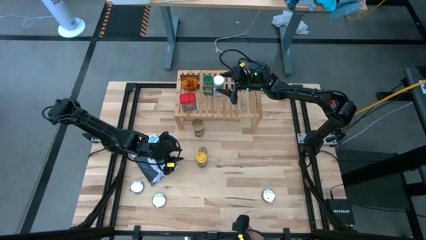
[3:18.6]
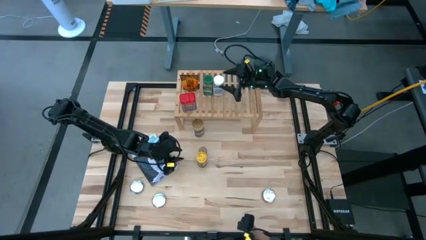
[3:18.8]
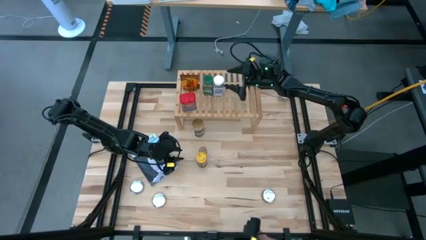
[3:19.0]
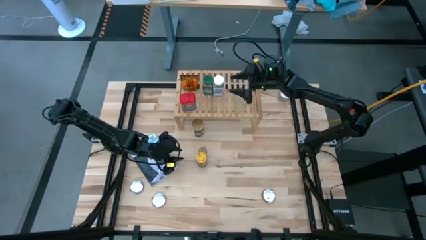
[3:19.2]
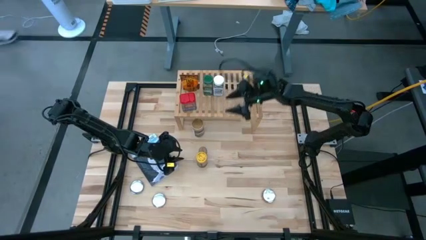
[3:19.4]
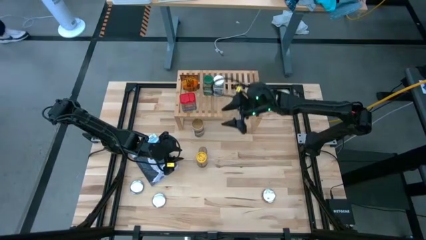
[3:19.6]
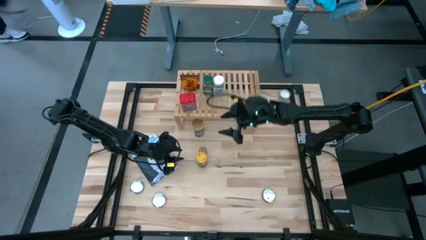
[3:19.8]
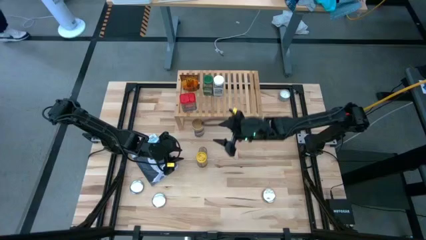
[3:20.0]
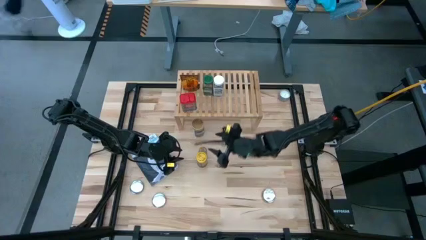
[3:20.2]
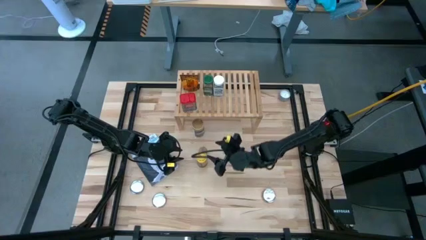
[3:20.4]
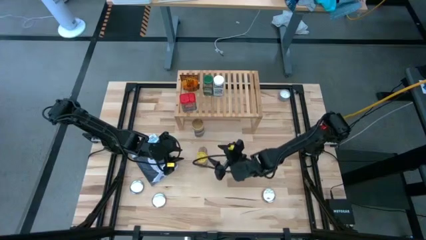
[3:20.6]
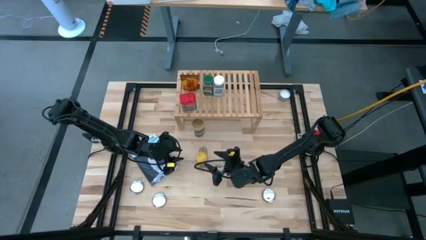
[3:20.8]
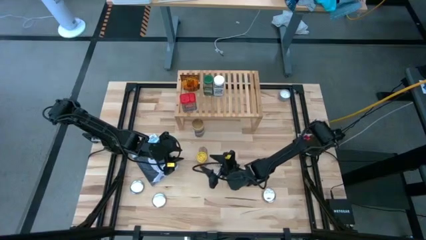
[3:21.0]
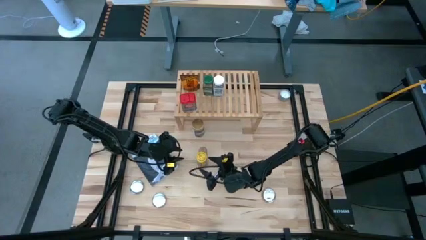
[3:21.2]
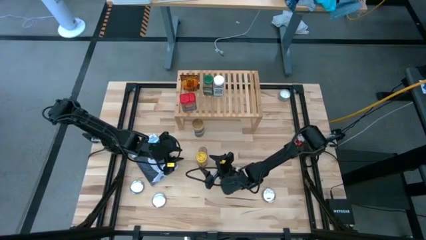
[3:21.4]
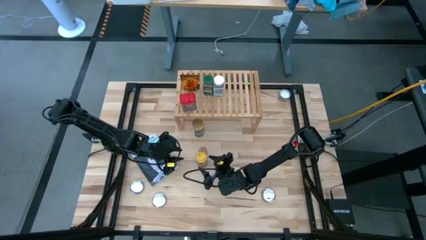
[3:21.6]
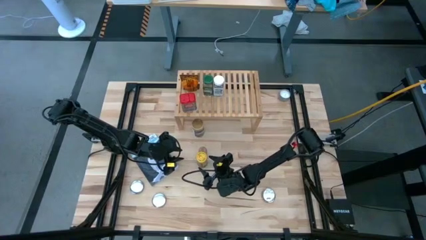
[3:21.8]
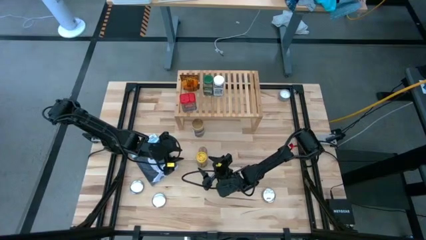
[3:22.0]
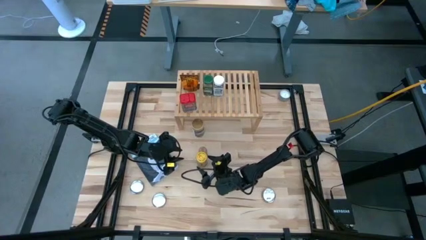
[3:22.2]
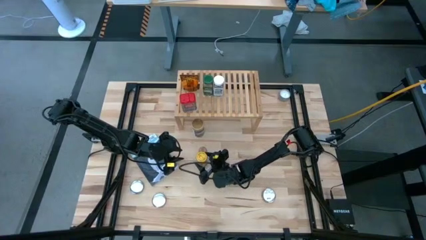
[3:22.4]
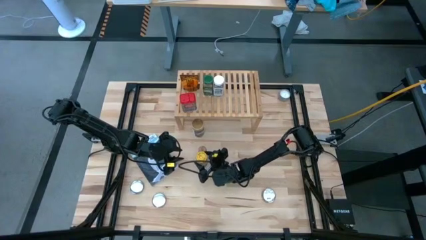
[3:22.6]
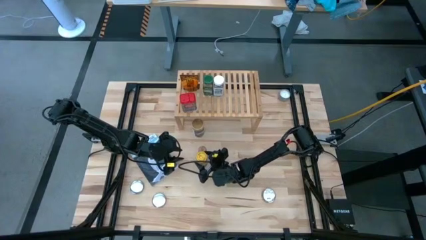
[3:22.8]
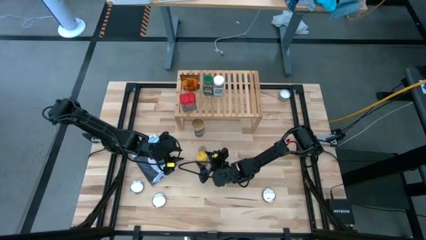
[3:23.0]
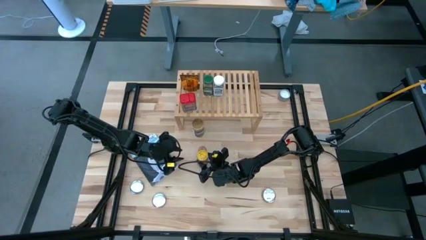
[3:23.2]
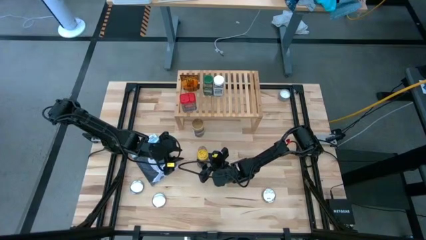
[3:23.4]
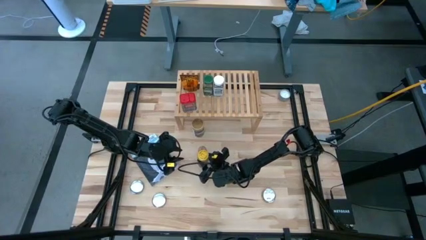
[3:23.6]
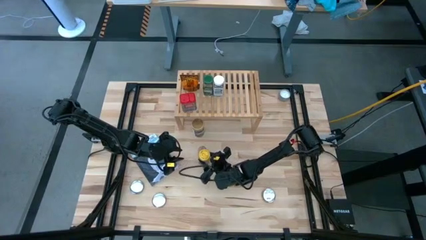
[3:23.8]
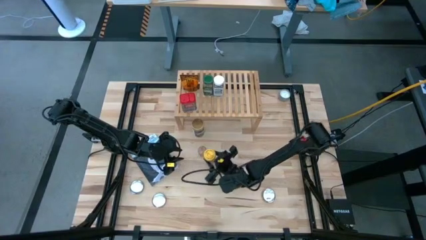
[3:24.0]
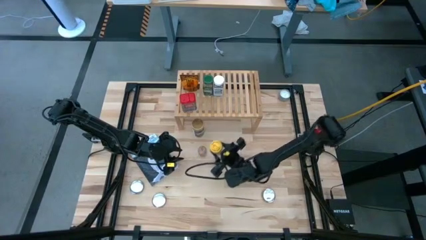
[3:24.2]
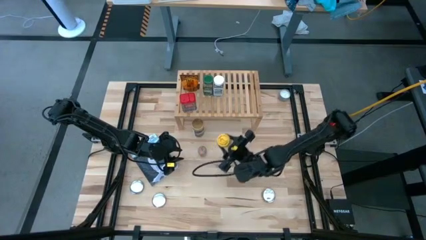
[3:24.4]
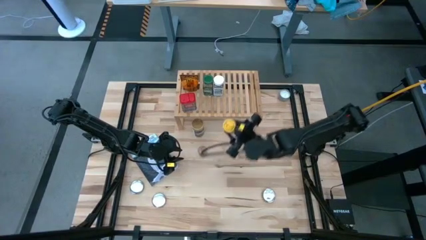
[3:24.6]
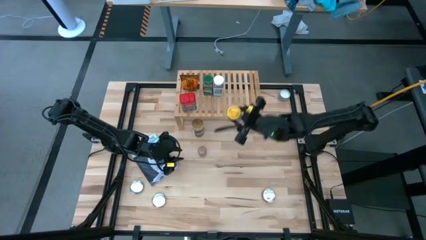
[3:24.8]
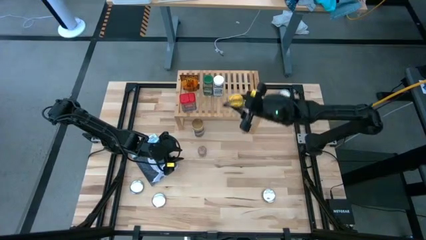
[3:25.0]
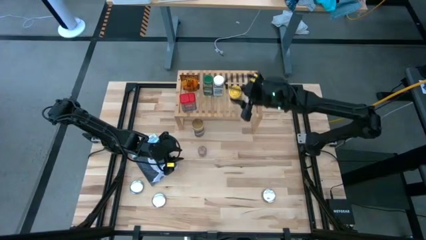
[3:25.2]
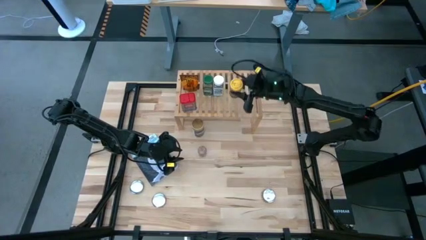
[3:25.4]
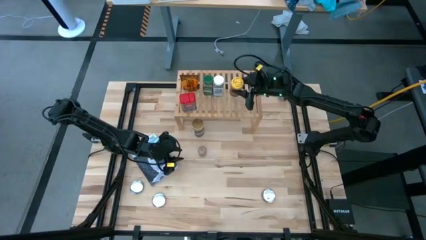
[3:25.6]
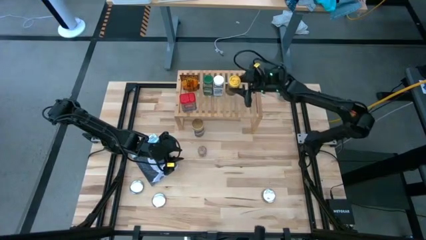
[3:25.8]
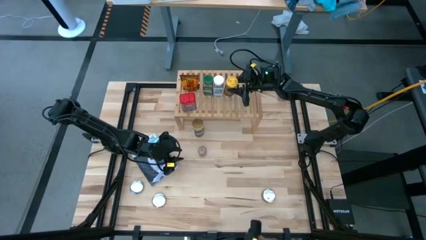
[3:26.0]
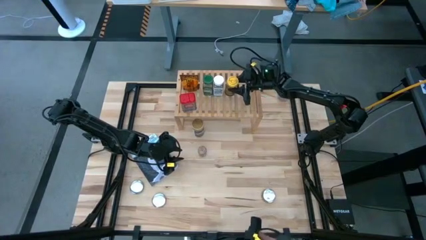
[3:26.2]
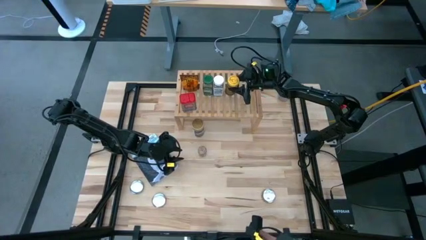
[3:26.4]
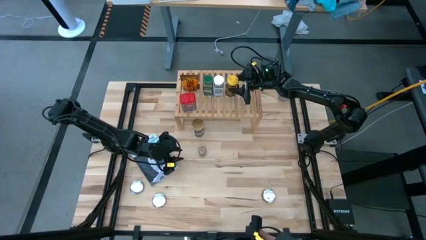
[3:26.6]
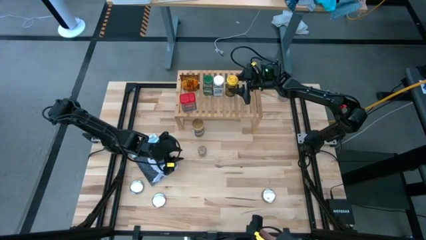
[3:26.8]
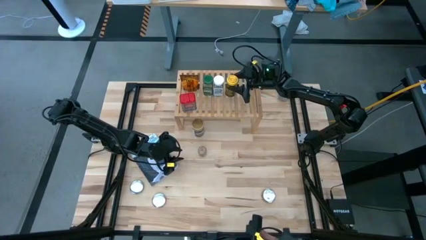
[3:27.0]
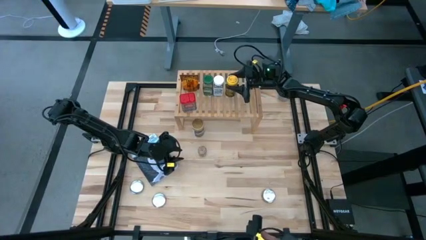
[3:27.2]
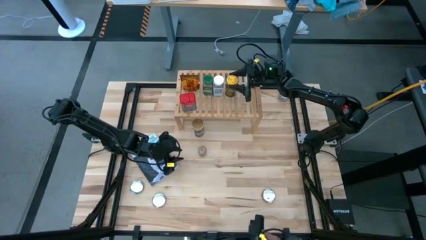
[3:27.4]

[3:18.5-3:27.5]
Task: Shelf spices
Put the yellow seasoning bottle on the shelf

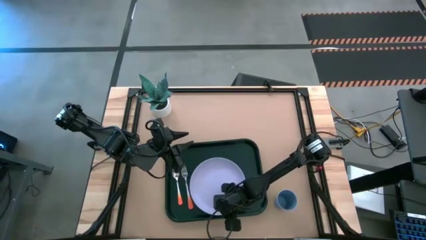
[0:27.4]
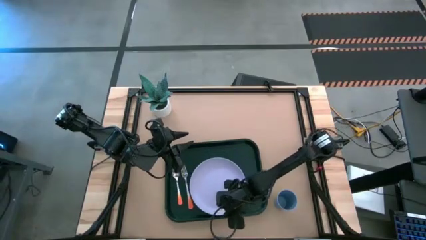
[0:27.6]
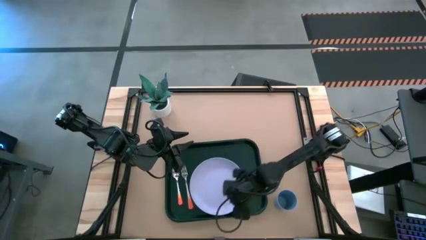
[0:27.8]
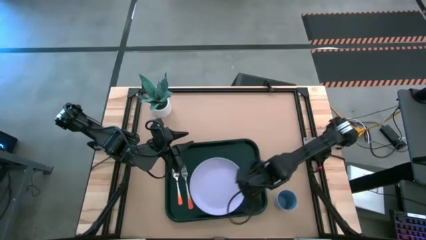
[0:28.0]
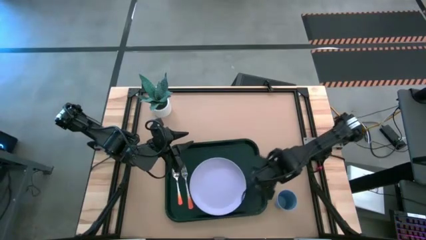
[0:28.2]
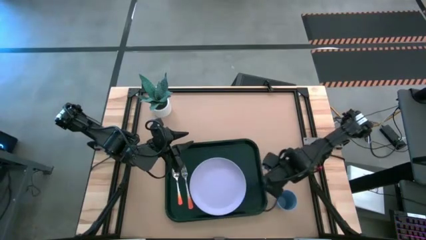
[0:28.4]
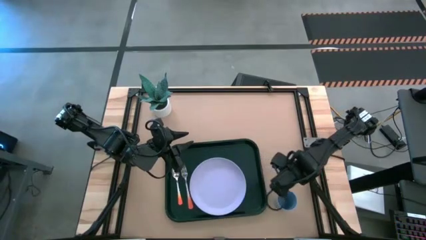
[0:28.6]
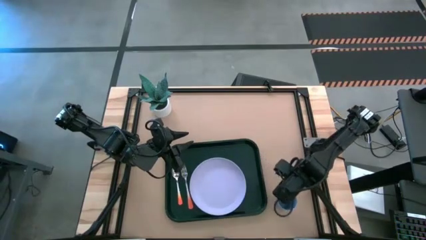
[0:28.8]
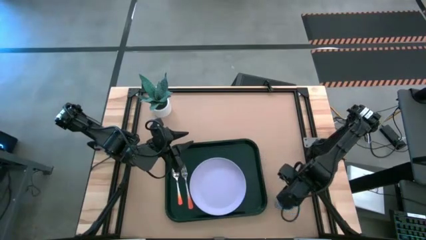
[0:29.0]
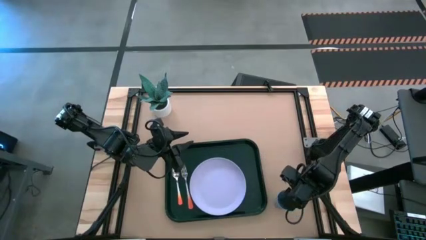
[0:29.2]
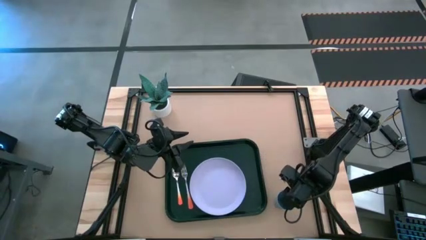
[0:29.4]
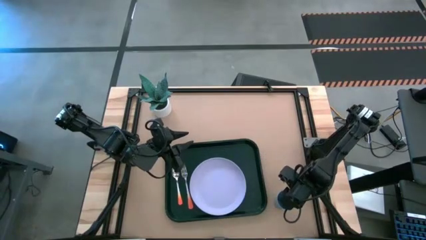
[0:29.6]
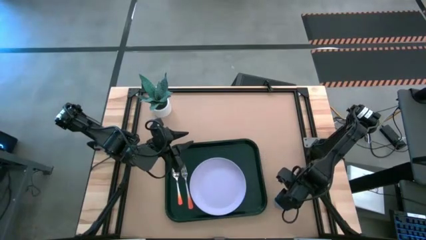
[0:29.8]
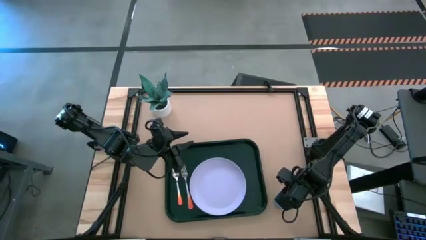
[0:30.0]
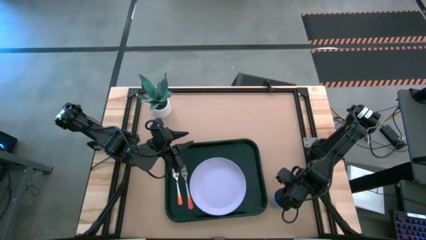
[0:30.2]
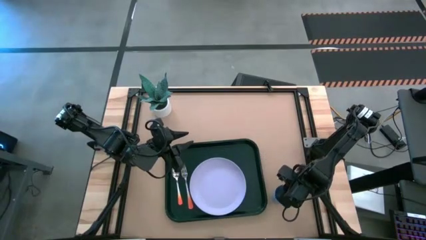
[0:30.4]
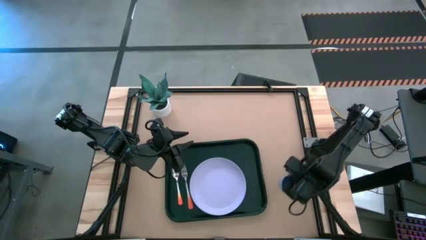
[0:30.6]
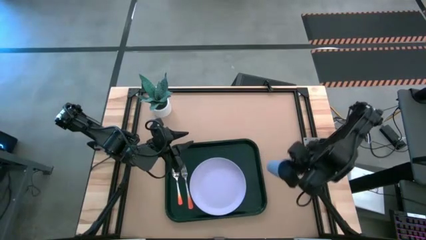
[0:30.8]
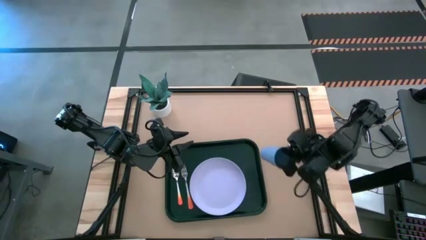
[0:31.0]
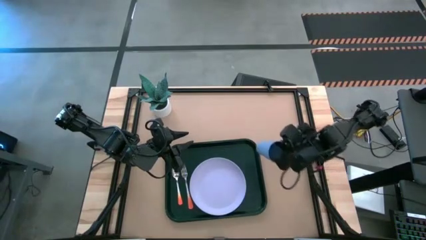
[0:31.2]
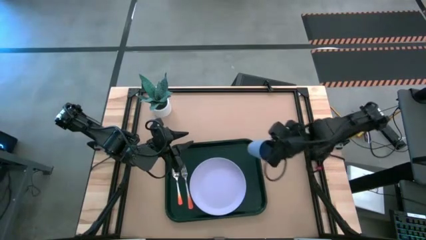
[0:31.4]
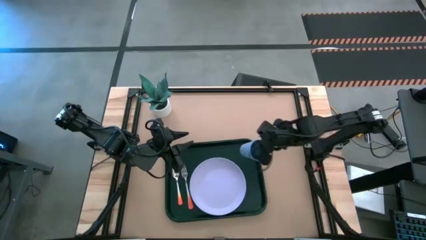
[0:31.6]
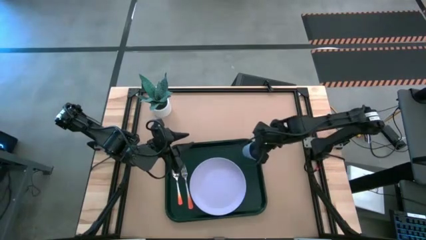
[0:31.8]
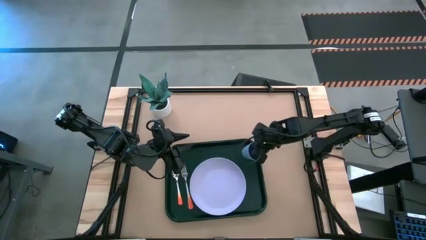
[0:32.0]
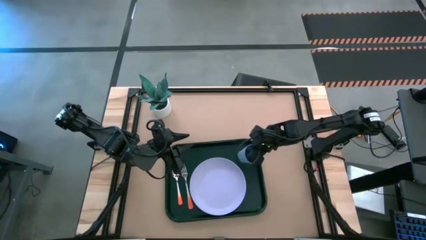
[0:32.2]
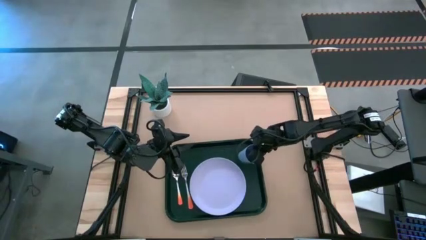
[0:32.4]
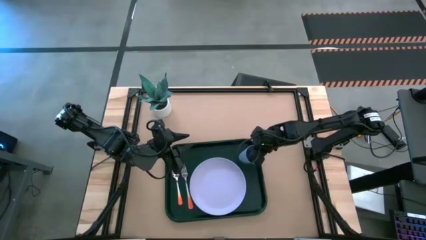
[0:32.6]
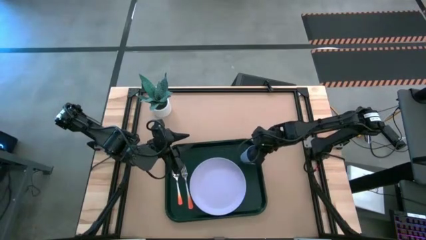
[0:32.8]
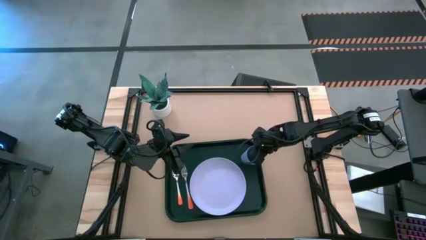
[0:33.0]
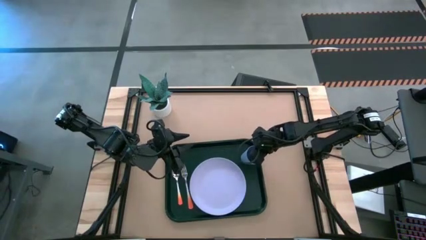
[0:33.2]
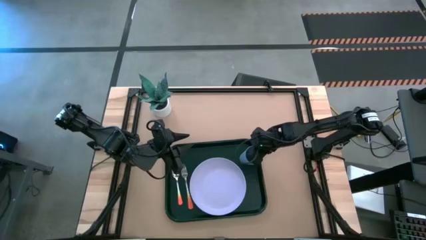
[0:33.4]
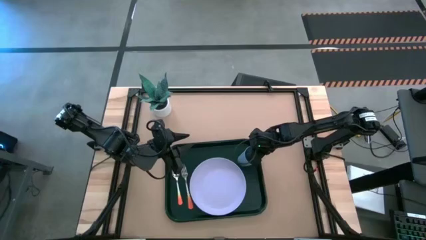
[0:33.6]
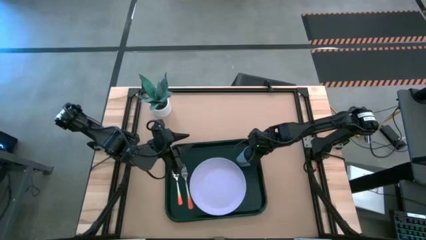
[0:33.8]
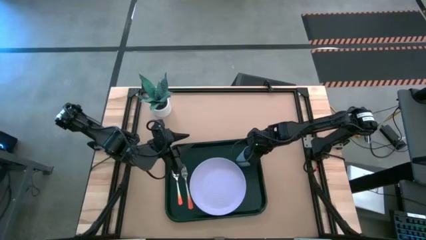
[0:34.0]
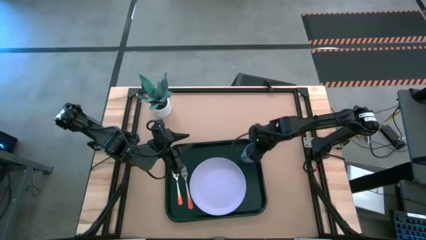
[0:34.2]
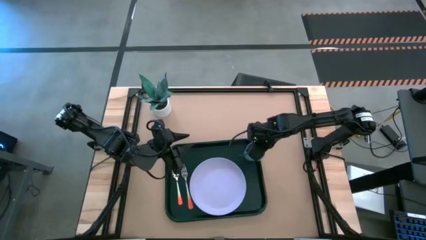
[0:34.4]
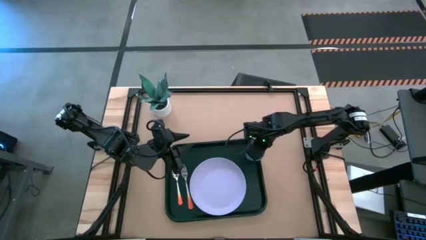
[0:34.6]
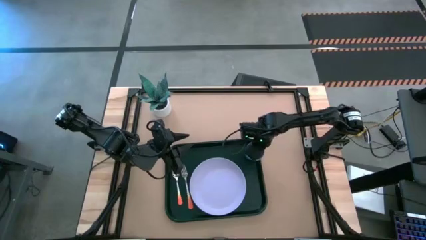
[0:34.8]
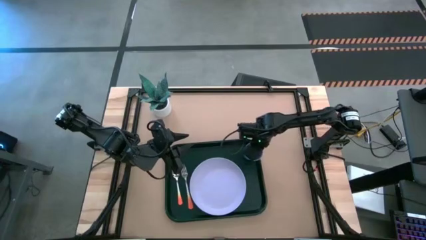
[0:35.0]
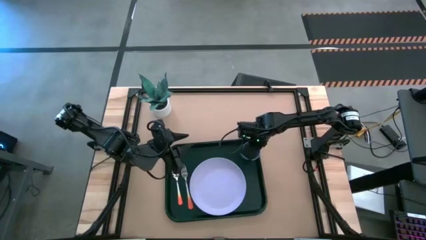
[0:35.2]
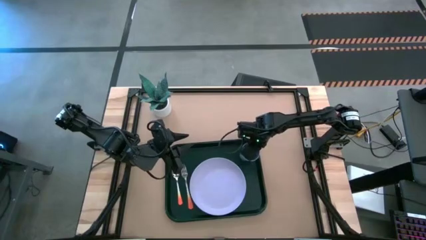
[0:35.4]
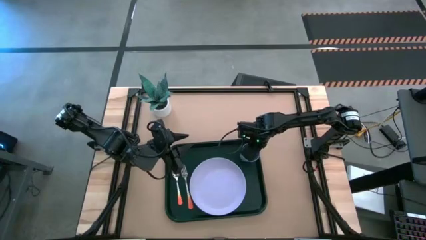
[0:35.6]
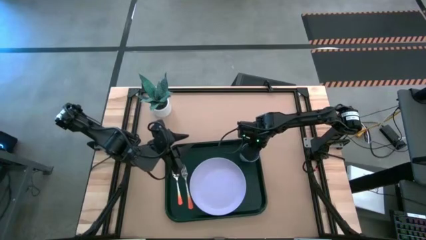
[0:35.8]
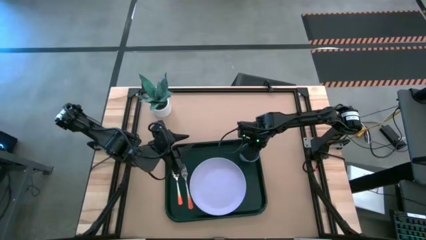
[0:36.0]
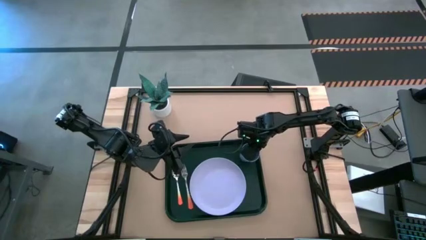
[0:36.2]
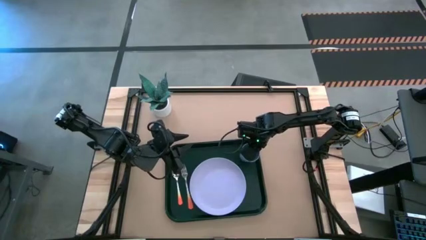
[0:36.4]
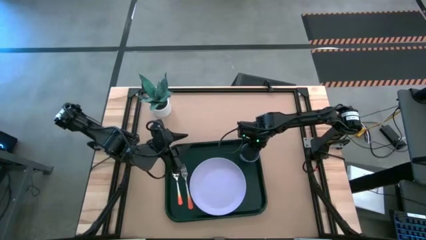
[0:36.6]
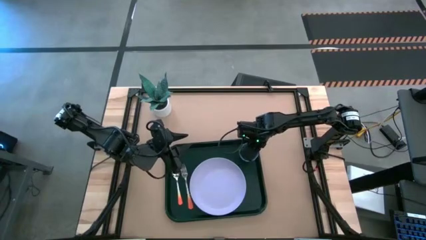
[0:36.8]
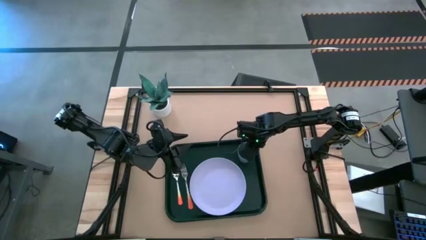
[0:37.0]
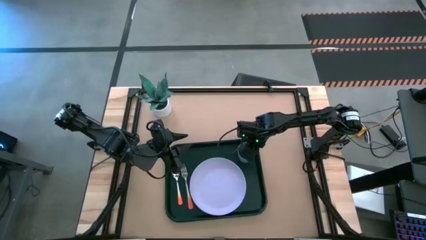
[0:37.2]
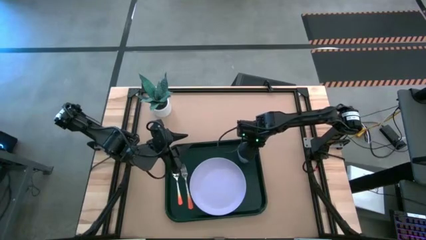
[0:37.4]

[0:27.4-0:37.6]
Task: Pick and place plate/cup/fork/spoon on tray
Put the blue glass on the top right of the dark green tray
